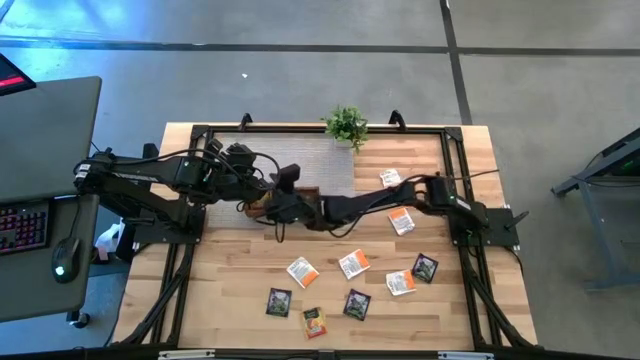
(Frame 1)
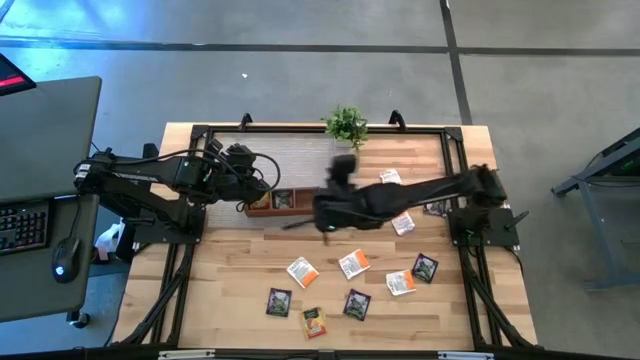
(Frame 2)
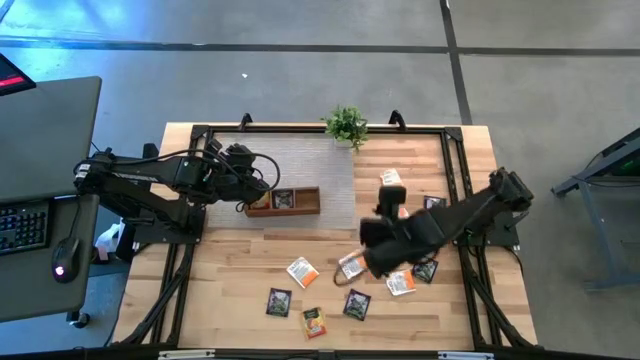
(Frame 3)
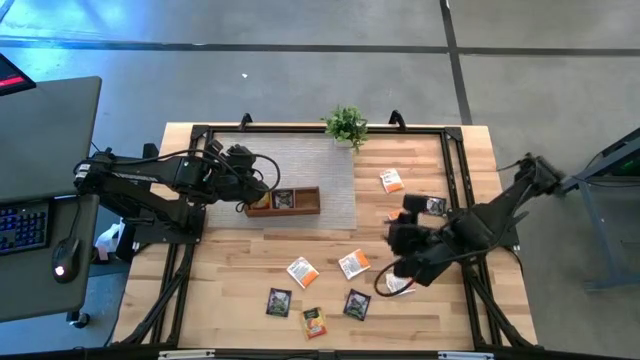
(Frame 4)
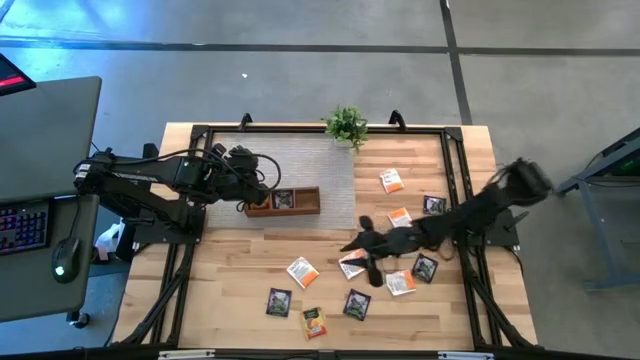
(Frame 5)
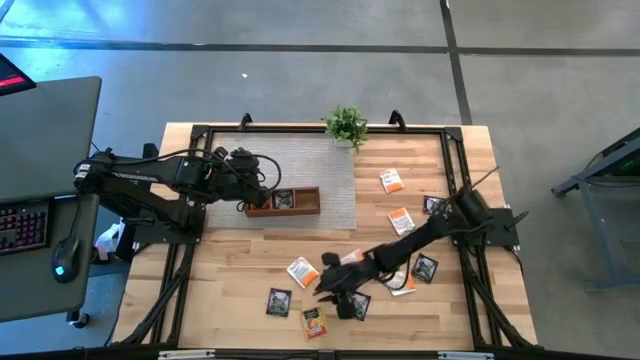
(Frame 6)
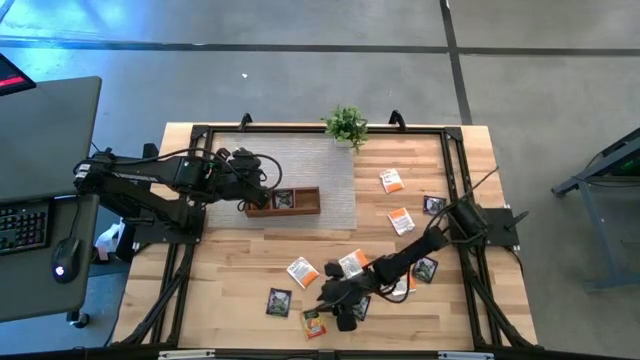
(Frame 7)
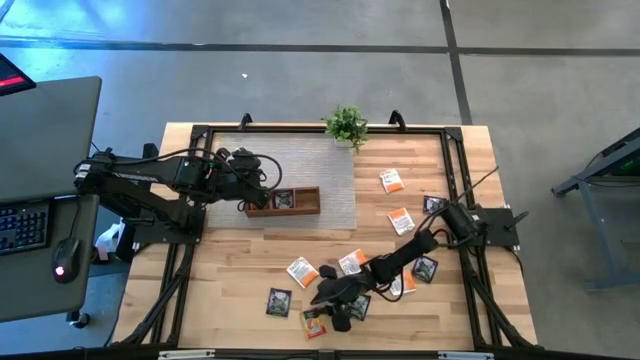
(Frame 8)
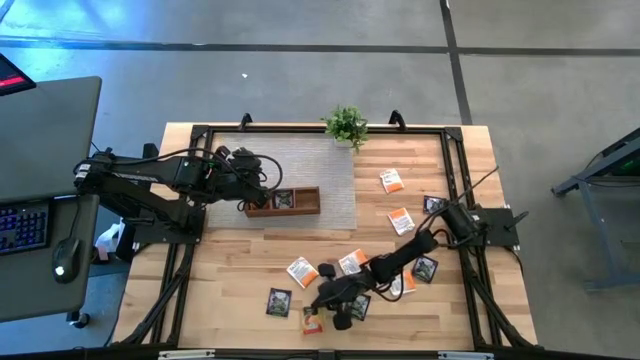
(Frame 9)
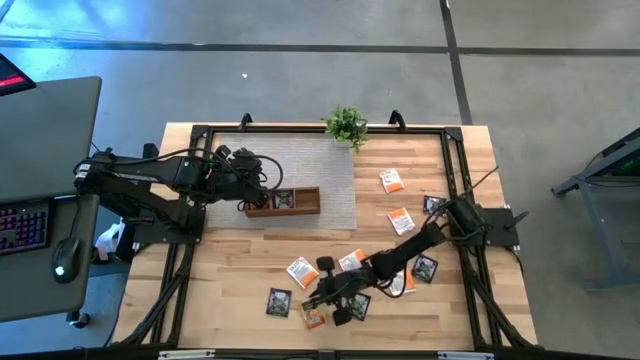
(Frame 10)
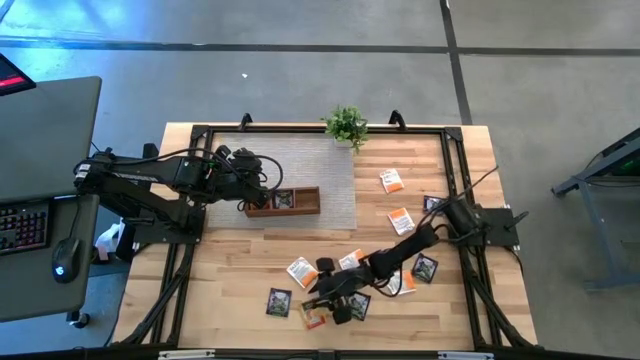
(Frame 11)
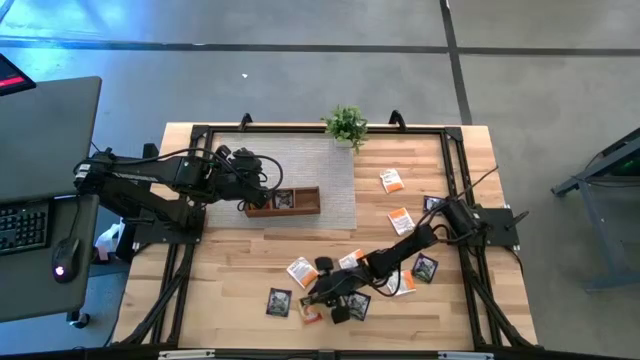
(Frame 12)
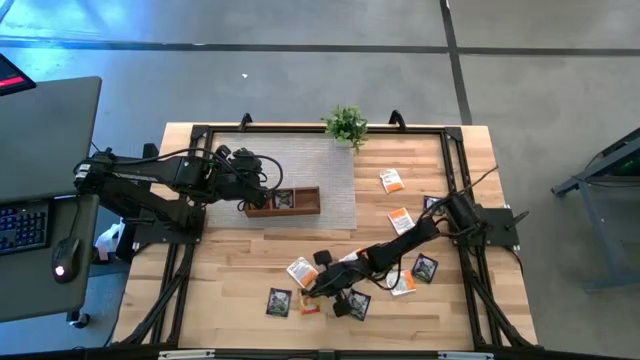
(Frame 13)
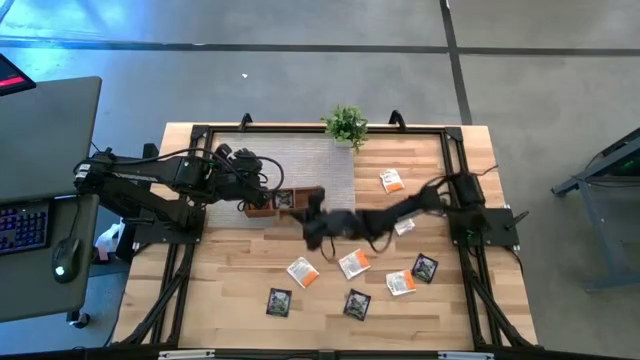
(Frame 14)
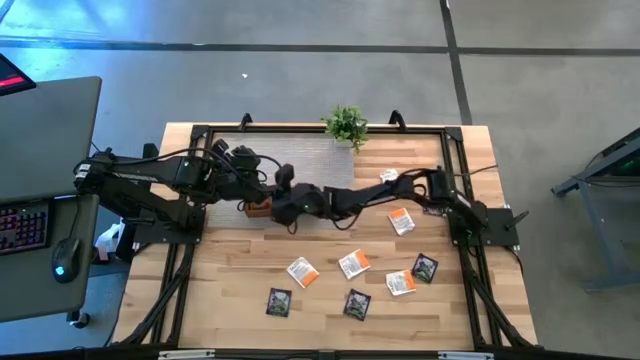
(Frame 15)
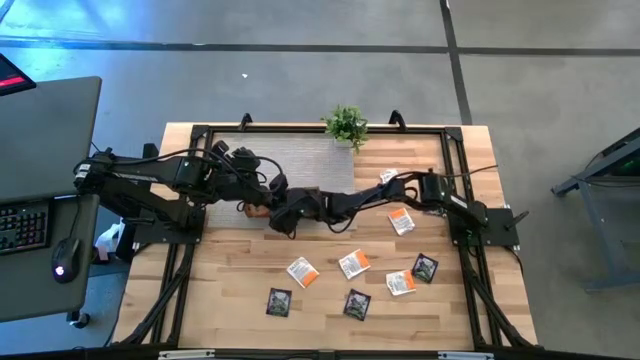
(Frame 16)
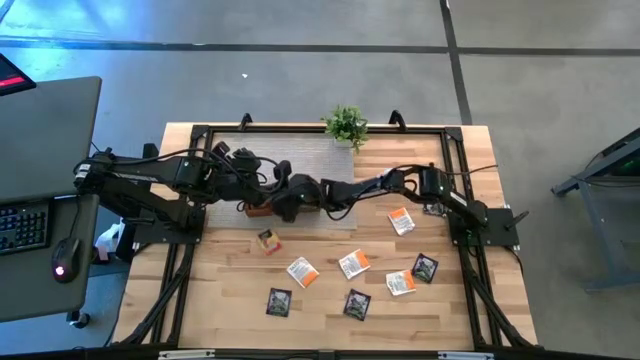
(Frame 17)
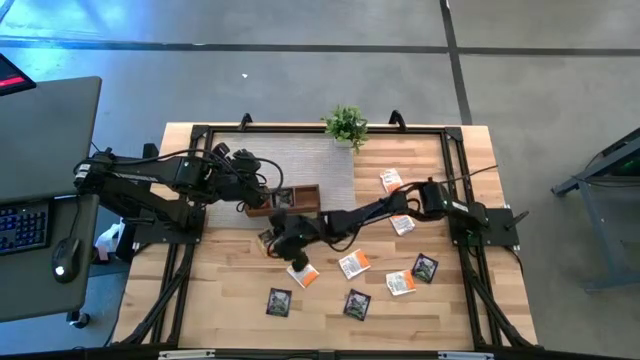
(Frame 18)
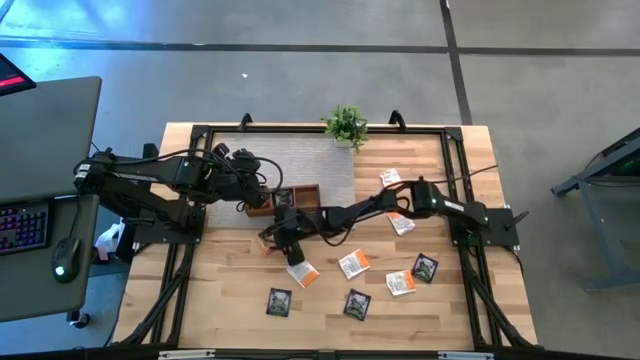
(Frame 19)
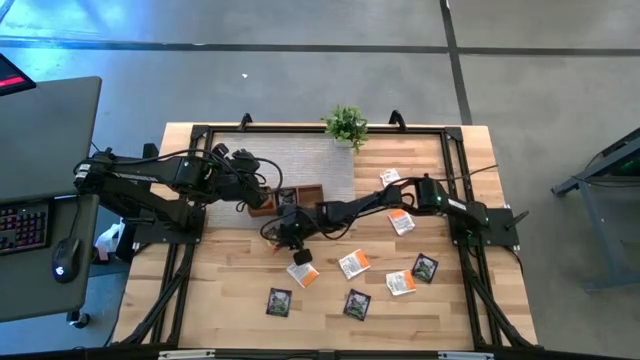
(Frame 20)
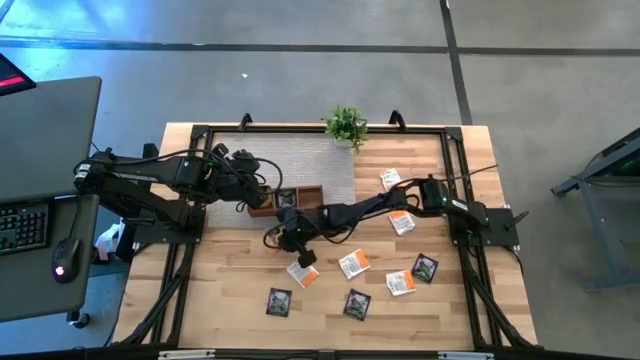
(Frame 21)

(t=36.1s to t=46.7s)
Task: Pick & Place Tea
Put the yellow tea bag into the left section of the wooden organizer

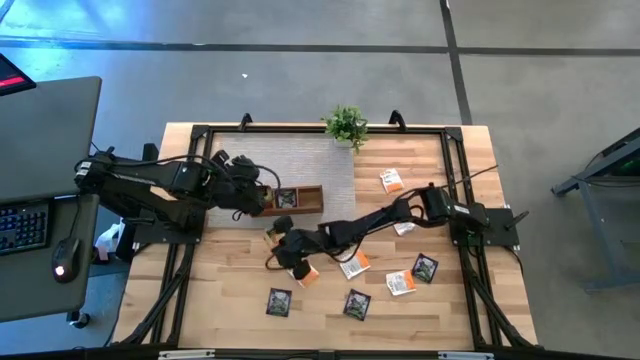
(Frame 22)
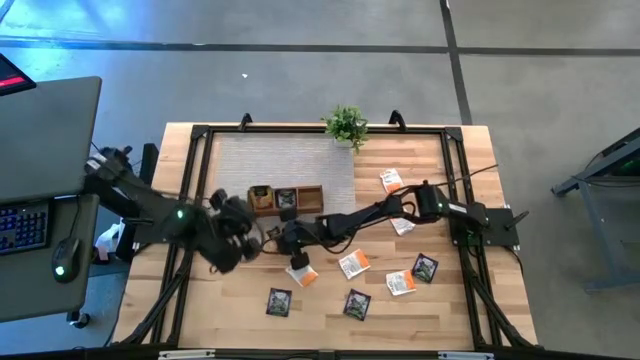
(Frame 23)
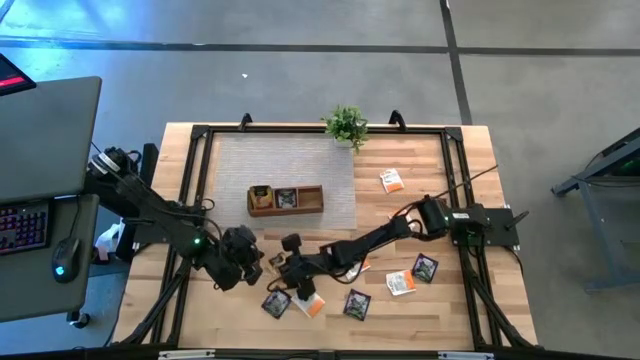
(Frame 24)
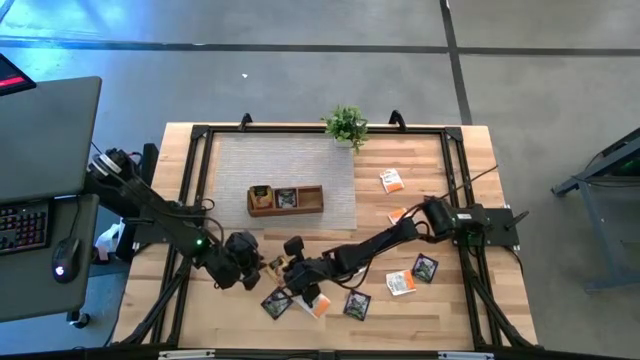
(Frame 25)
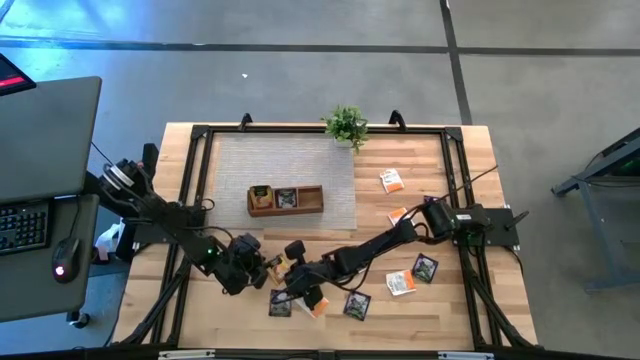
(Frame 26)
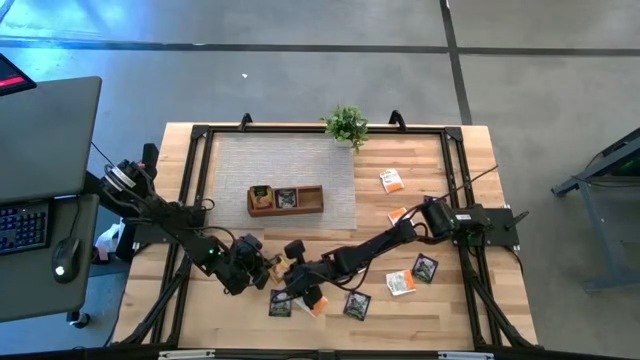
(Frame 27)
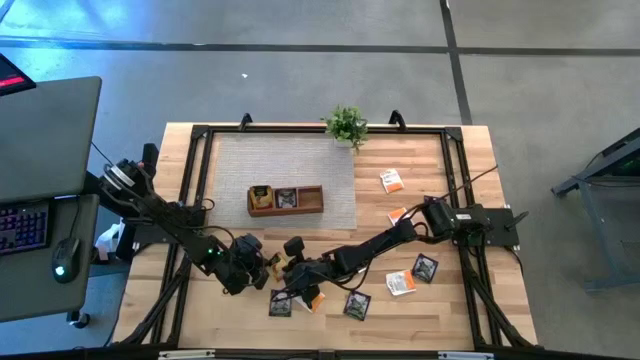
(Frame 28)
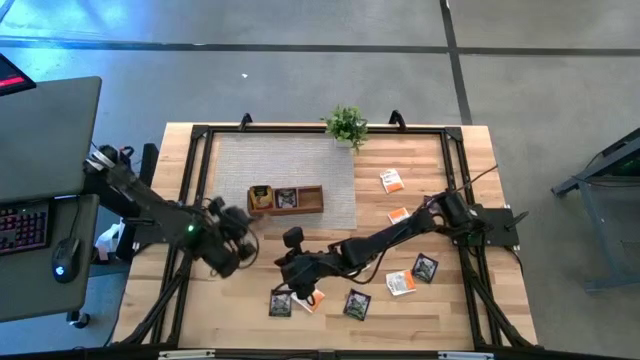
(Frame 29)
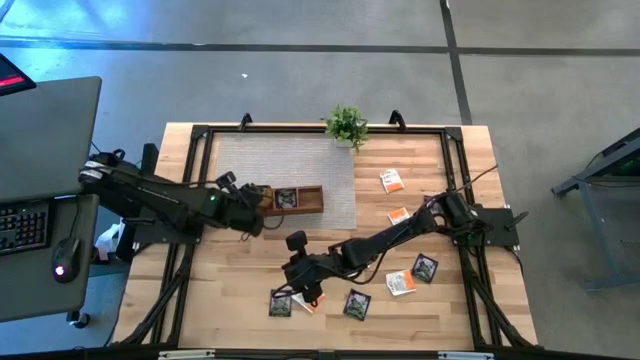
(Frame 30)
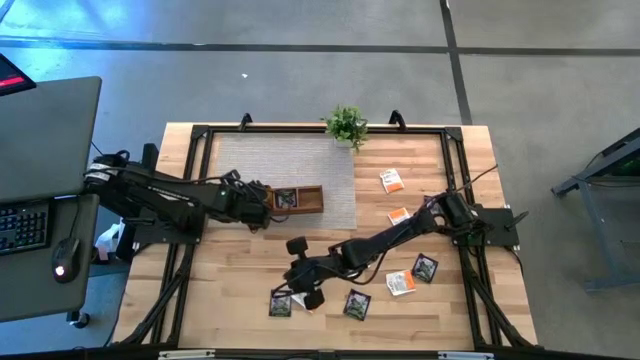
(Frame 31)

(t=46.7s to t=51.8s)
Put the yellow tea bag into the left section of the wooden organizer

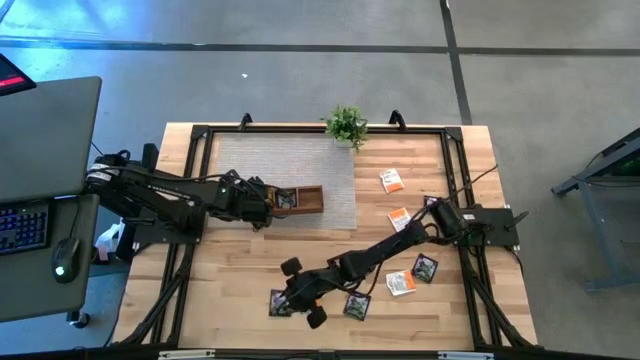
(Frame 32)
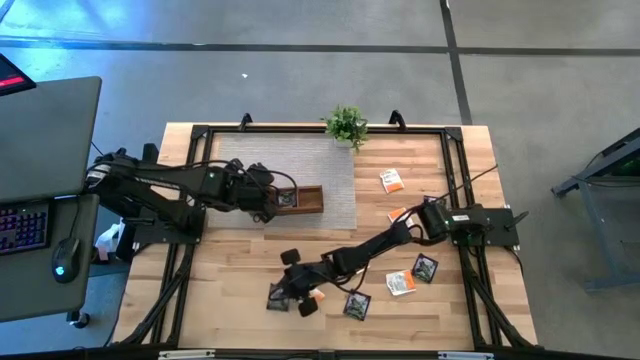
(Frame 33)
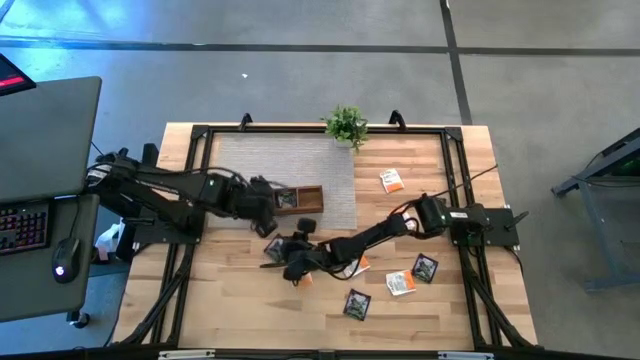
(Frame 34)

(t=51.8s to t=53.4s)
Put the purple tea bag into the middle section of the wooden organizer

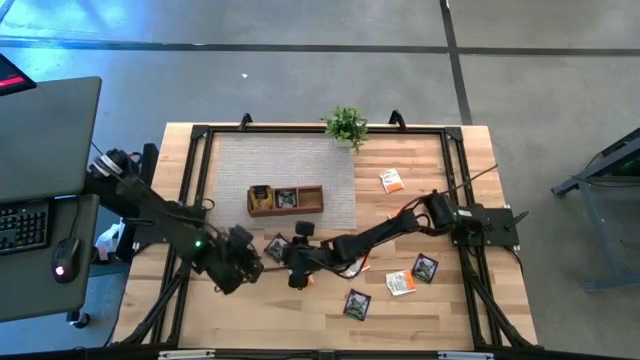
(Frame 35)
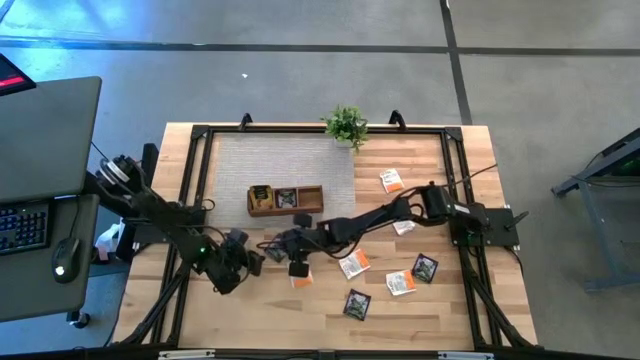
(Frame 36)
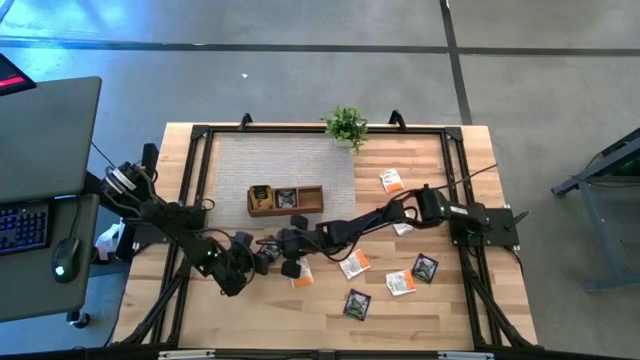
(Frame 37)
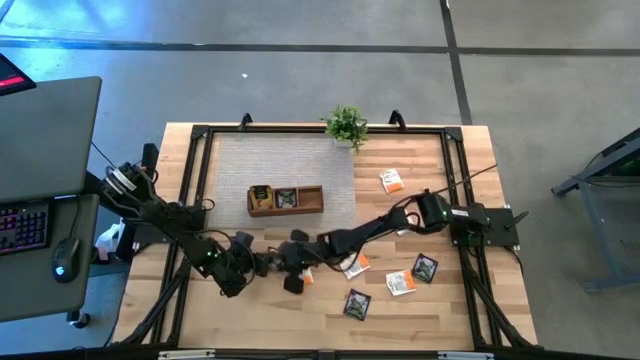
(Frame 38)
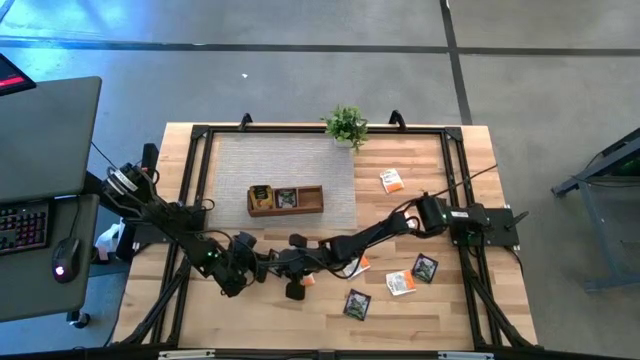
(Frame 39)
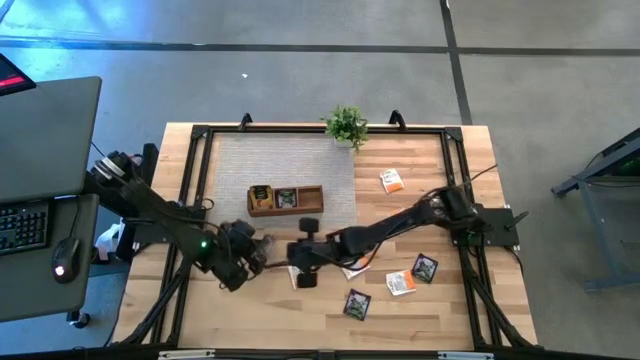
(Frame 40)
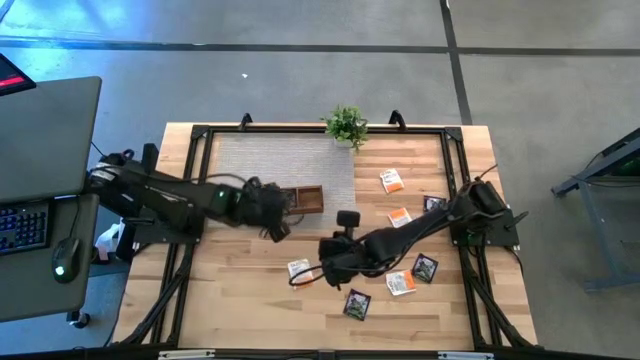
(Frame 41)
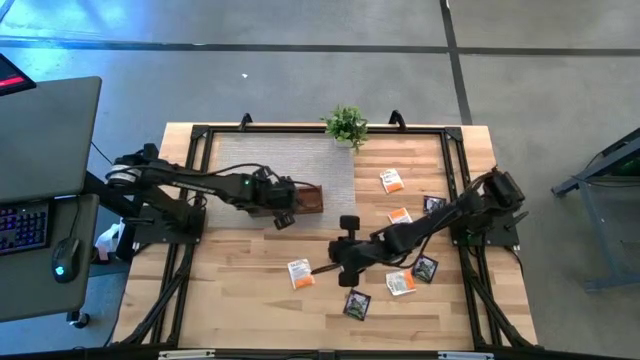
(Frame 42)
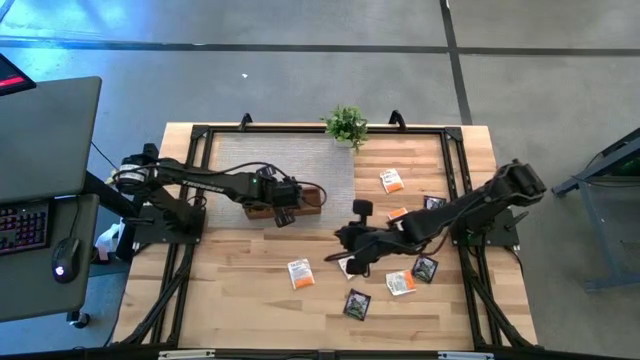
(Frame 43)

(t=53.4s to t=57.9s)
Put the purple tea bag into the middle section of the wooden organizer
